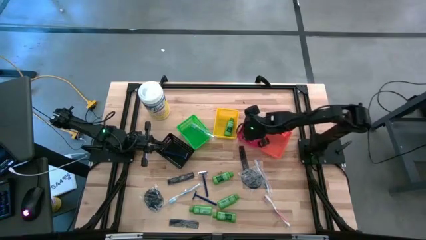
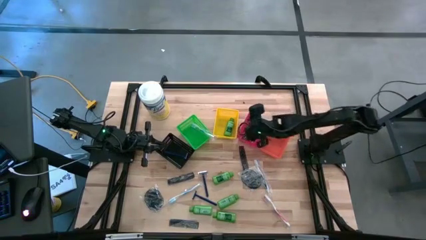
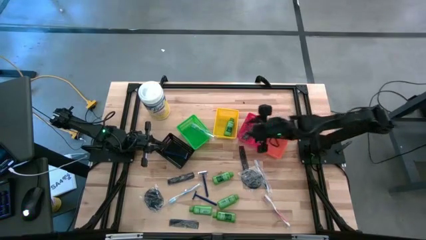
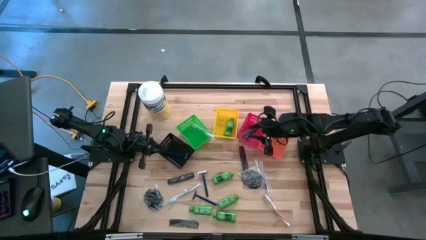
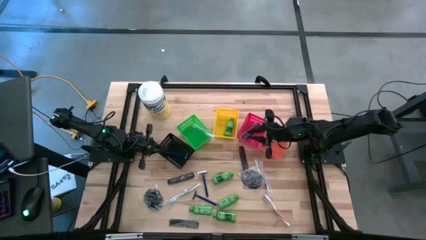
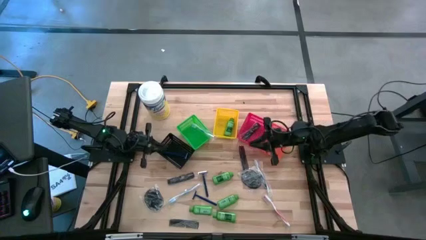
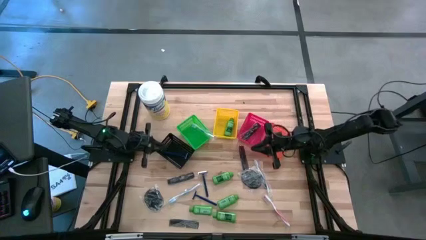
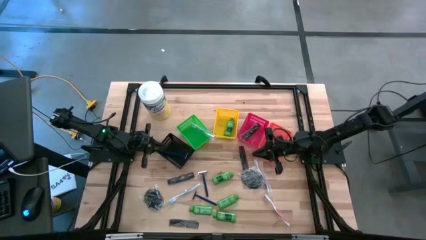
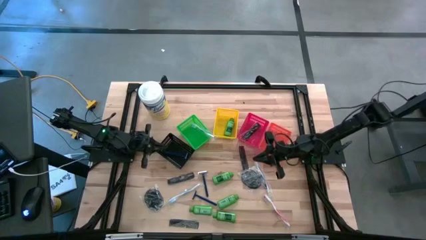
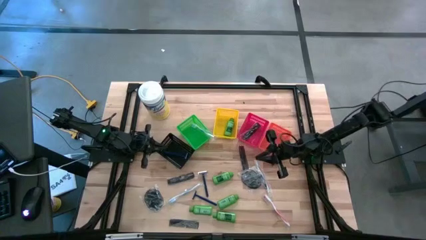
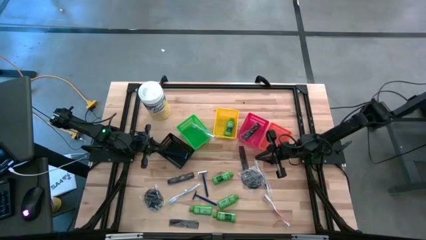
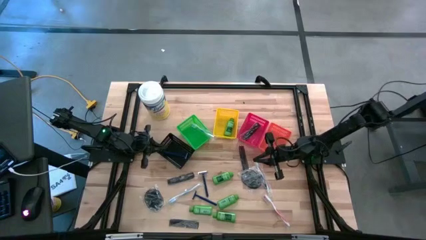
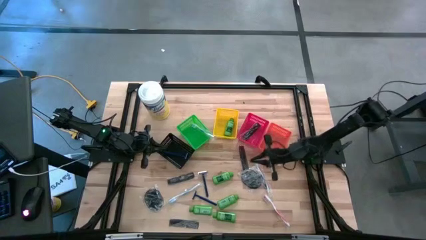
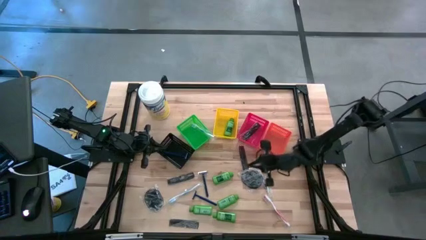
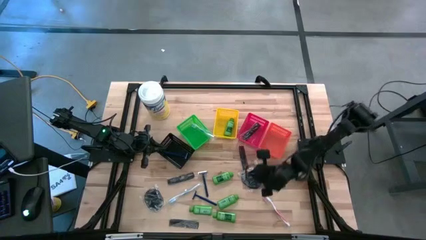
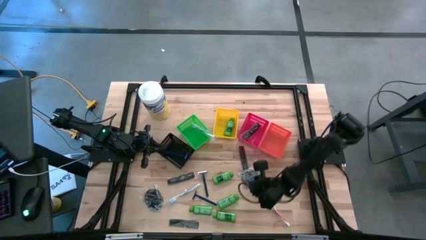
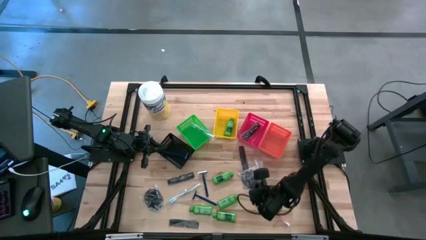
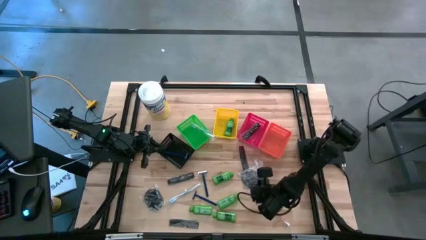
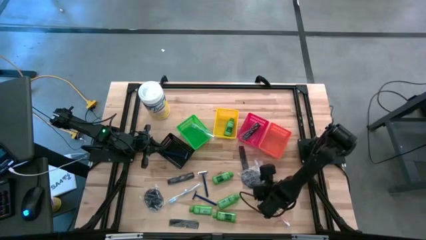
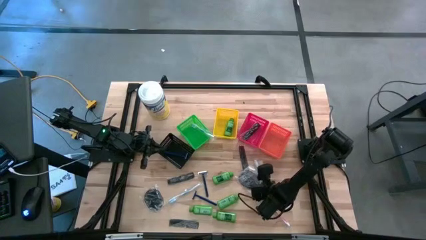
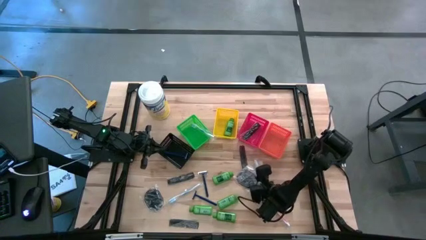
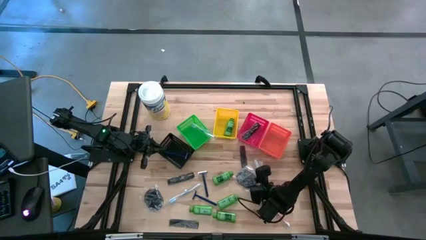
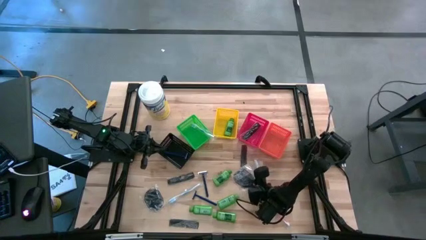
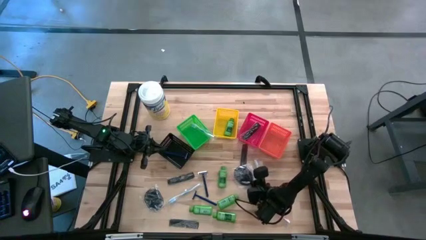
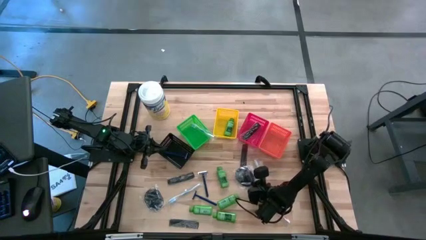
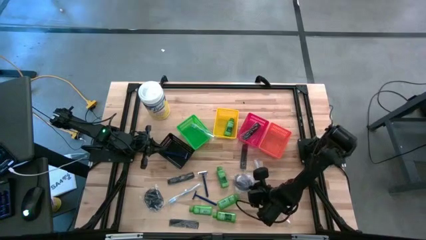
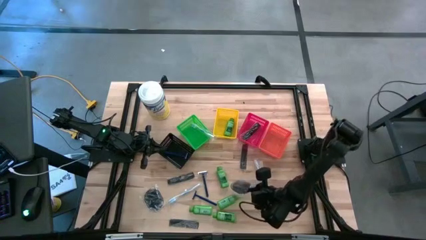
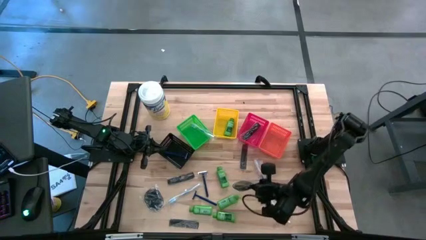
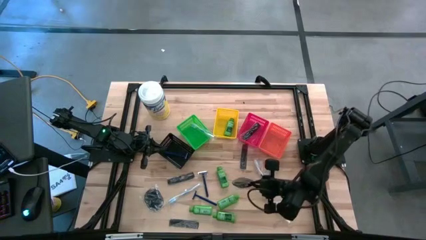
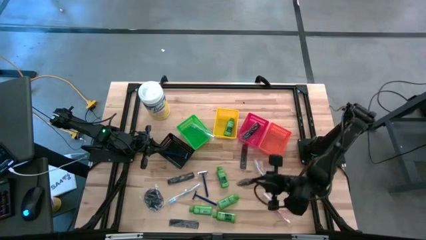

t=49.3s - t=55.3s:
Task: Pick & Place Travel size toiletries
Put the black hair brush into the orange bin

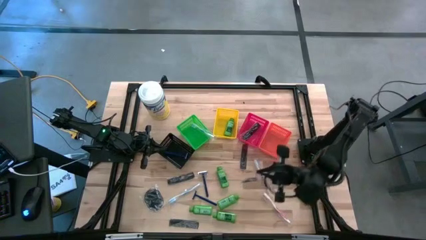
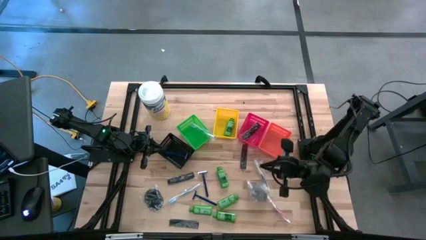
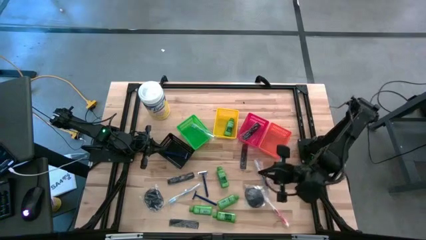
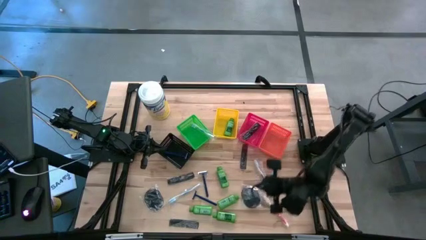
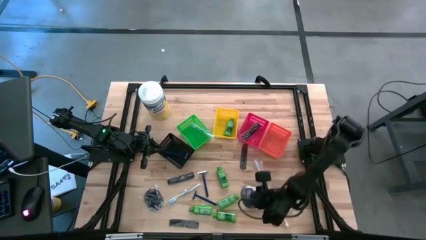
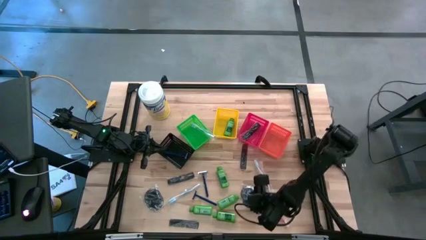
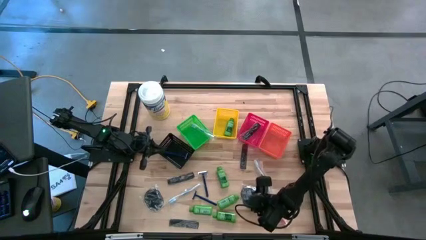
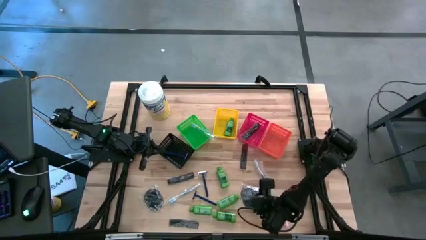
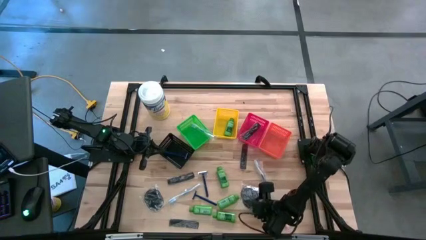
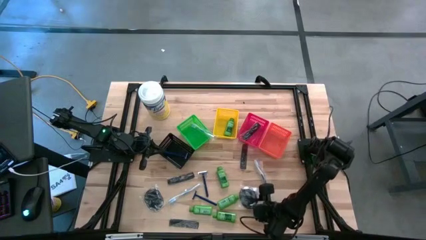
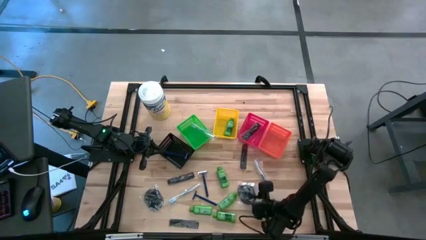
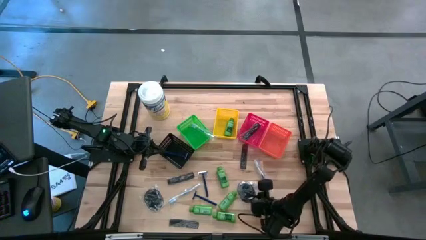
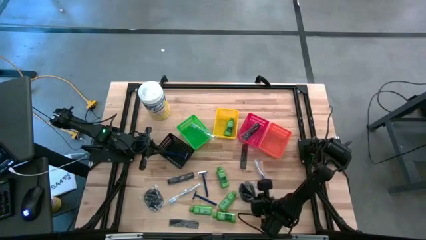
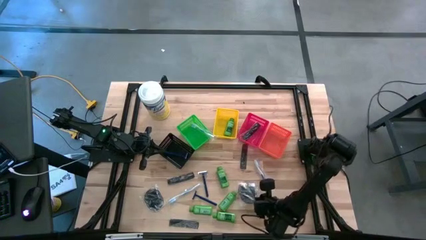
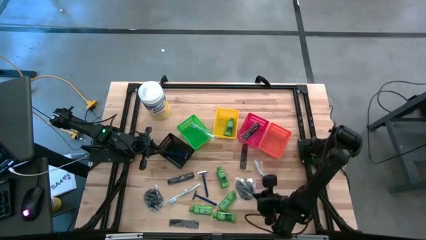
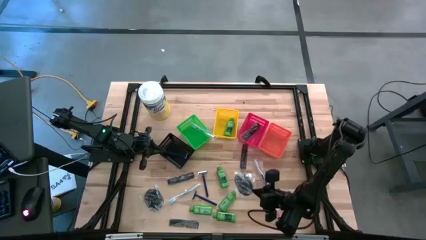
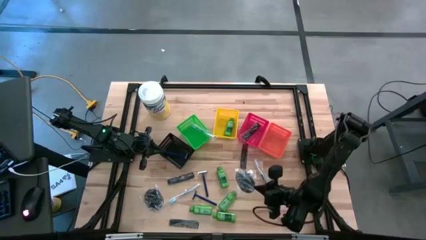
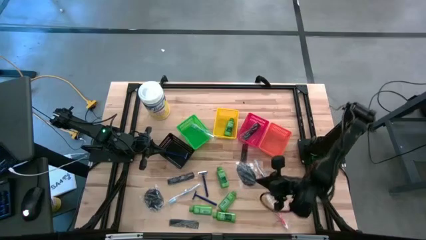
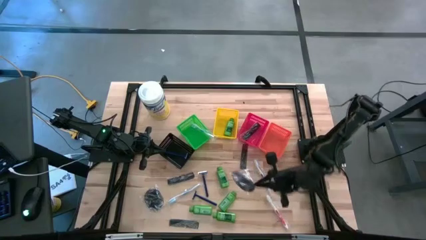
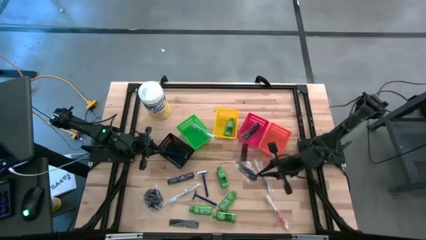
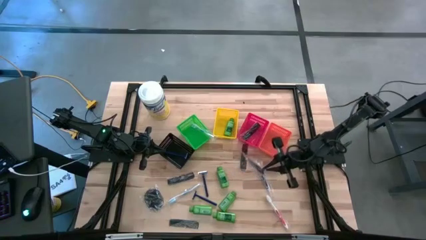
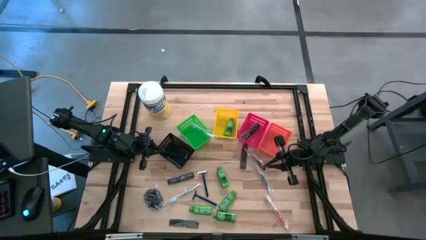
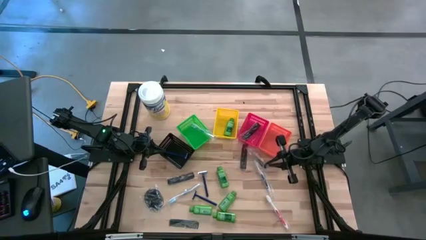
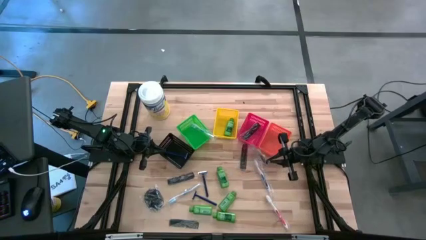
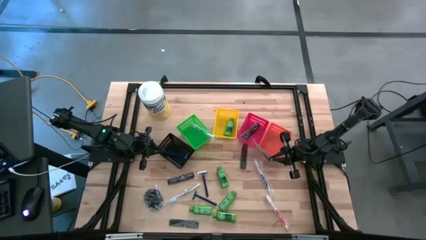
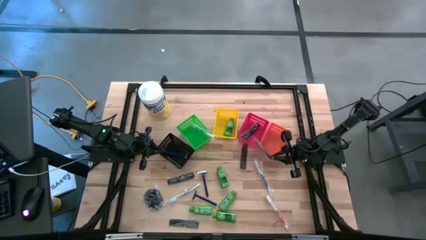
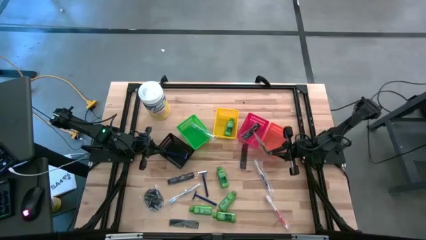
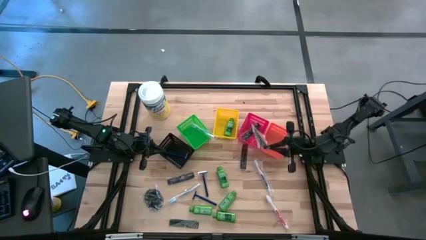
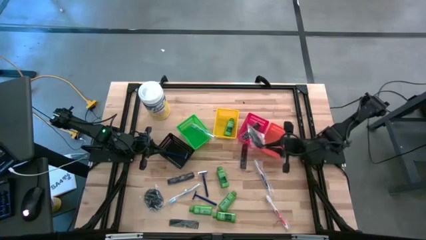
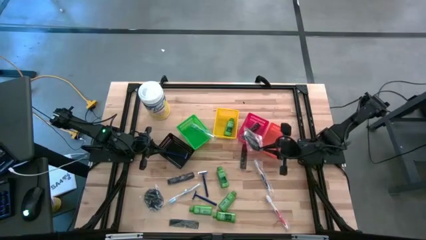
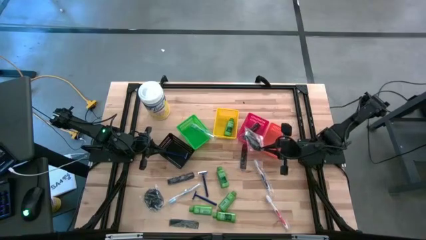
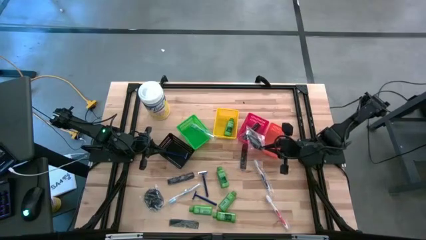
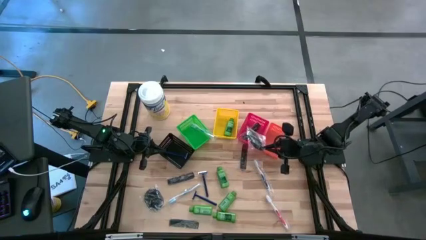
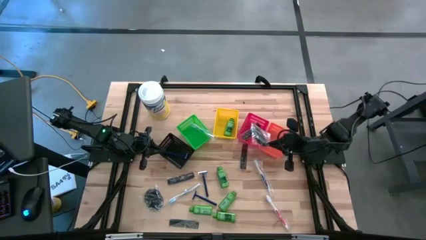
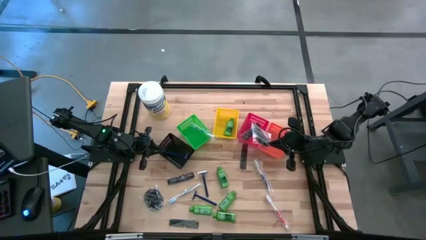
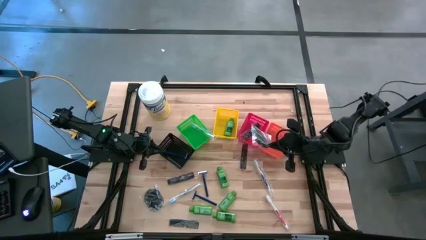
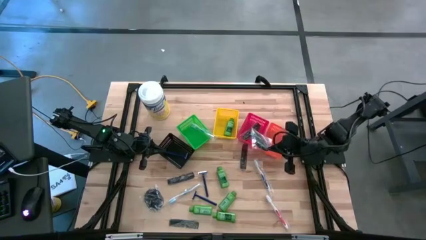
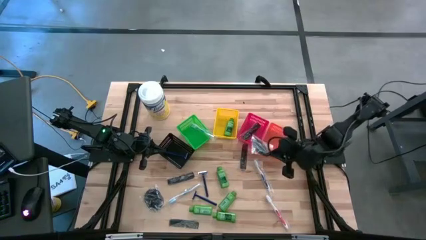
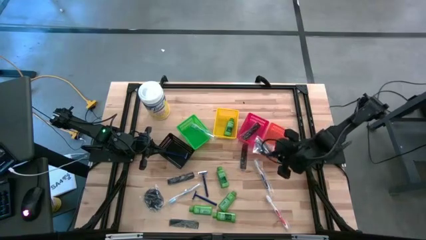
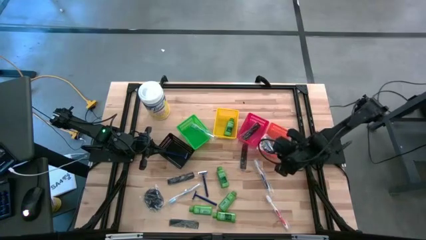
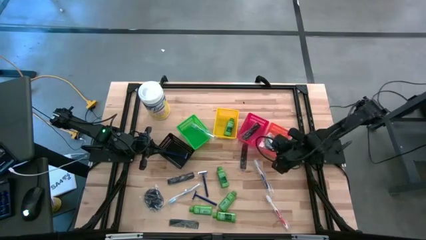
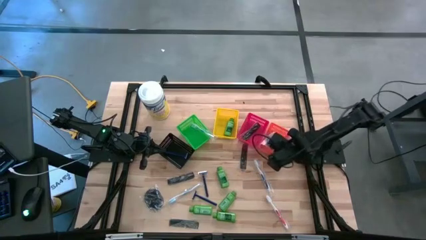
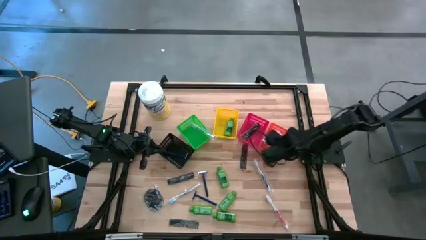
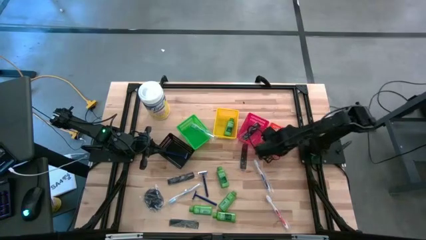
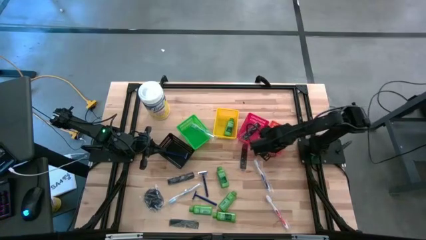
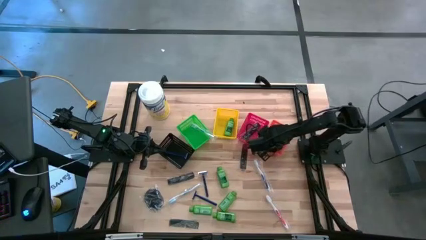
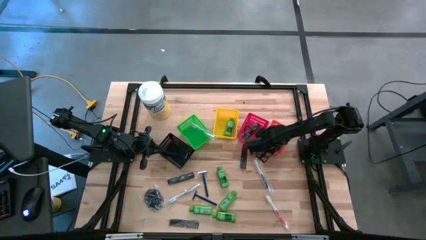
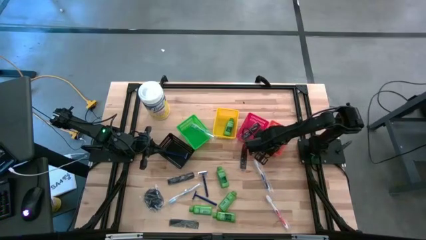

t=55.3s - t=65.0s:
Put the black hair brush into the orange bin

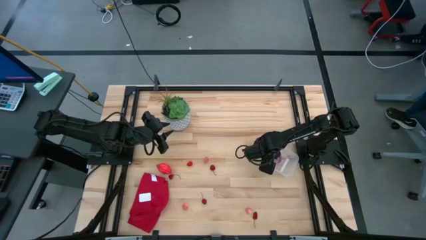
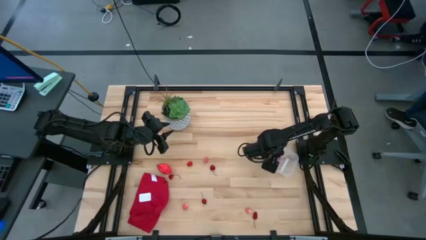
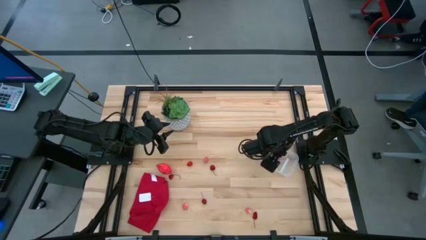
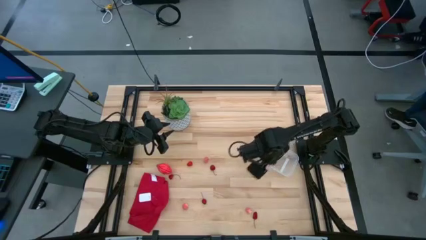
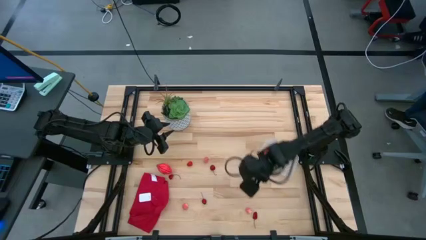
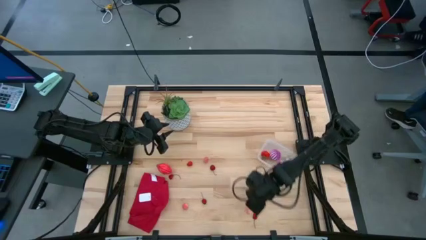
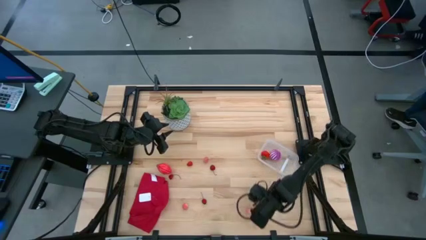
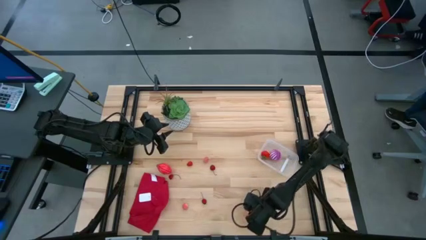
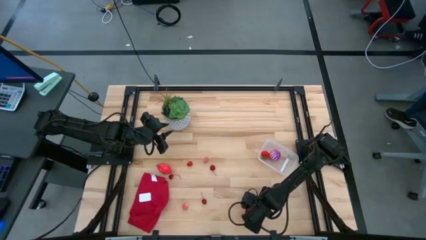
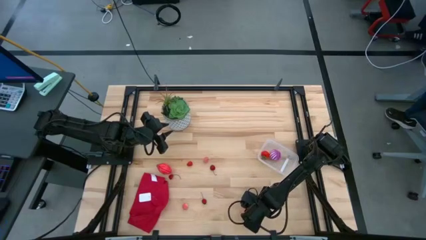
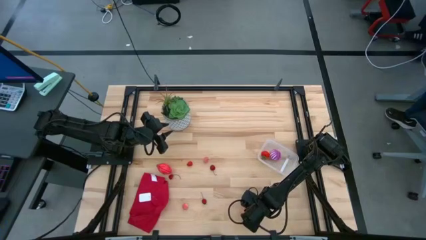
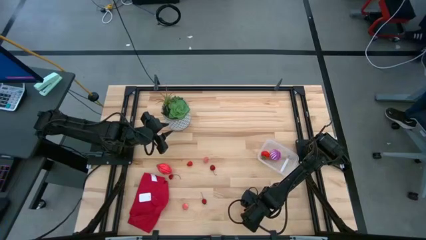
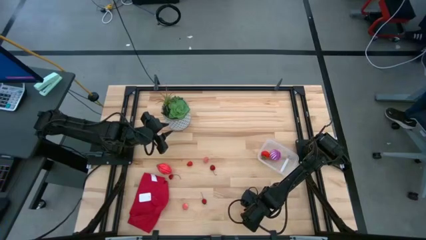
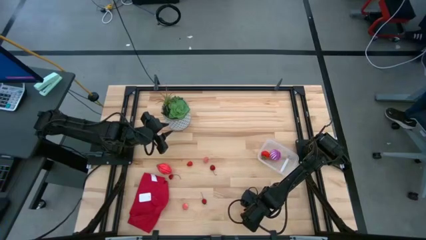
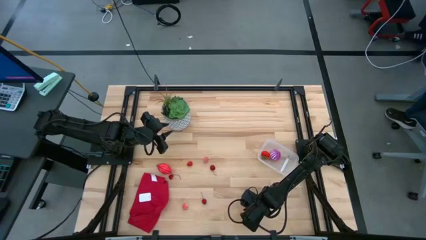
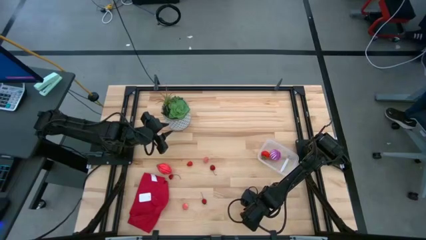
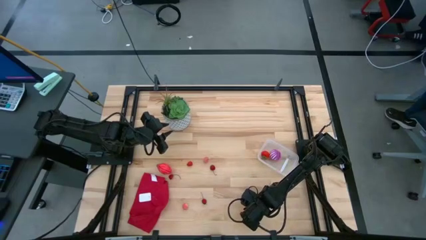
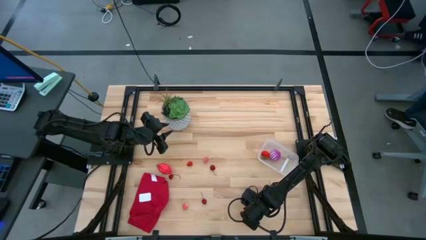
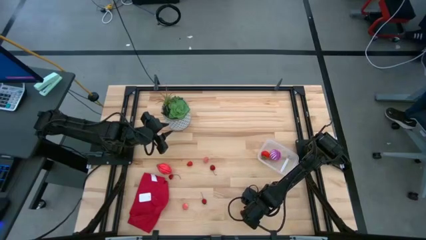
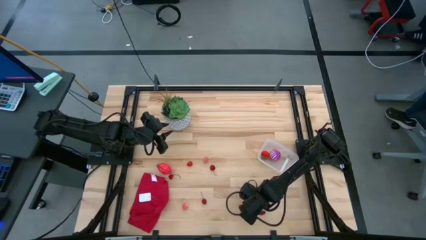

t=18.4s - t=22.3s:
Task: Pick and placing Produce into tupperware
Put the bottom right red cherry into the transparent bin
